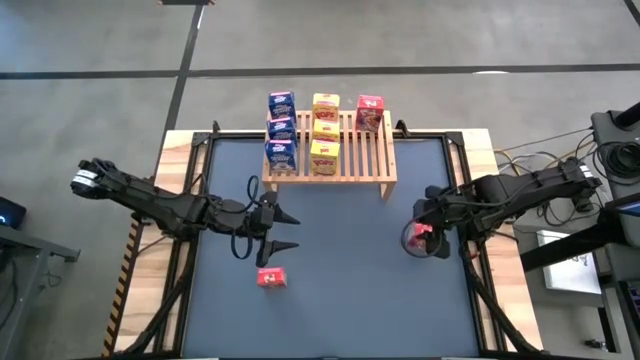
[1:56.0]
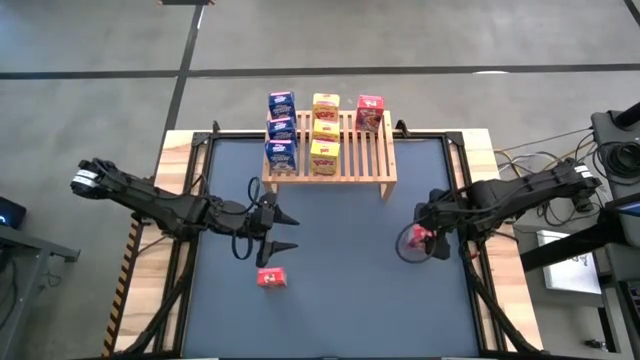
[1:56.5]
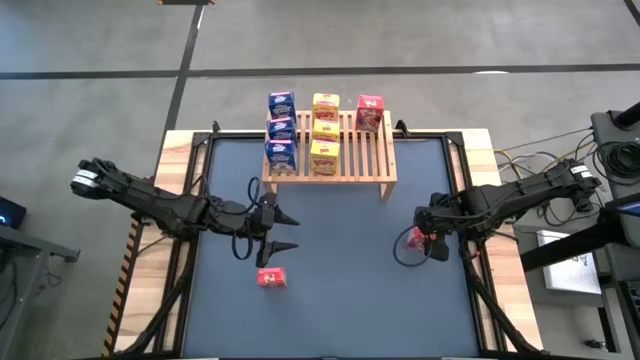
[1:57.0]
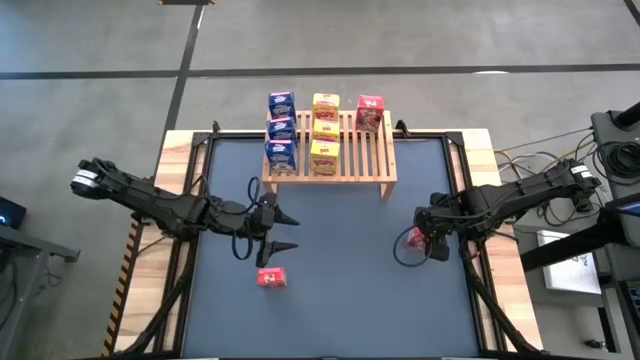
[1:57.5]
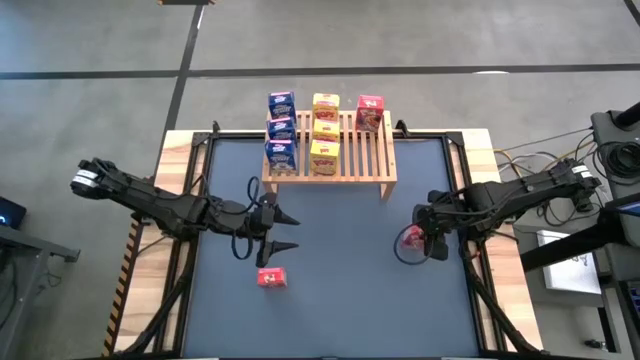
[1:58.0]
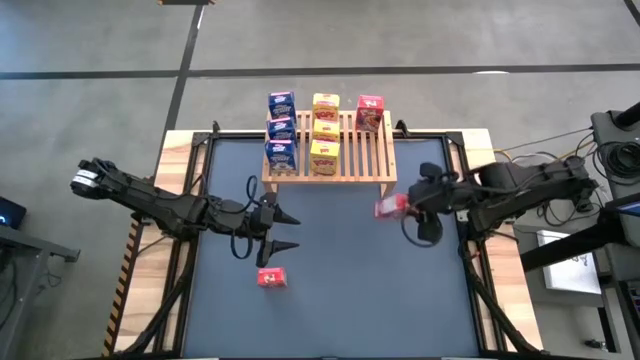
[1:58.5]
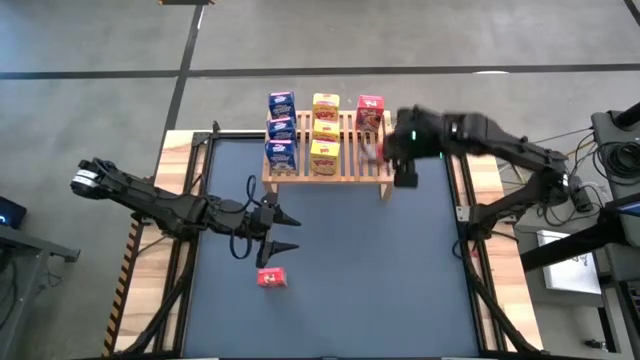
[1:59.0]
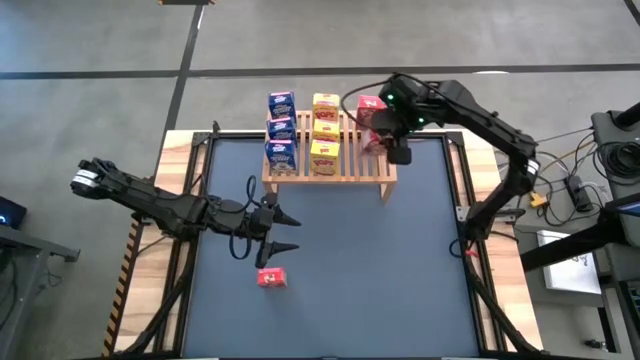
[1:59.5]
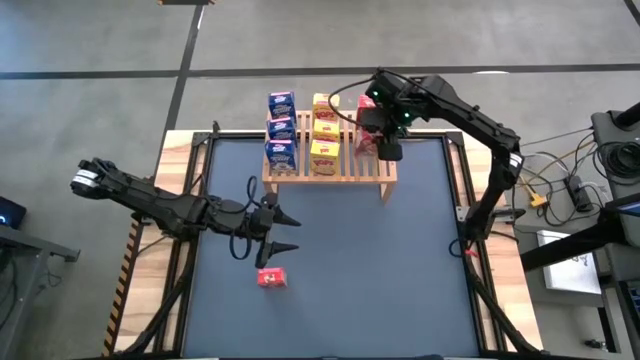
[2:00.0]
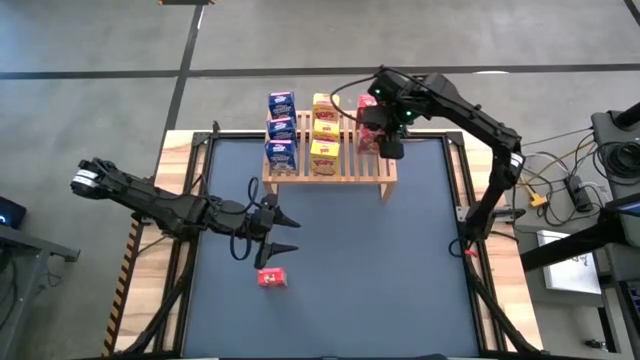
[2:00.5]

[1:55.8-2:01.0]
Task: Stack cereal on shelf
Put the top red cereal box on the shelf aligned with the other red cereal box

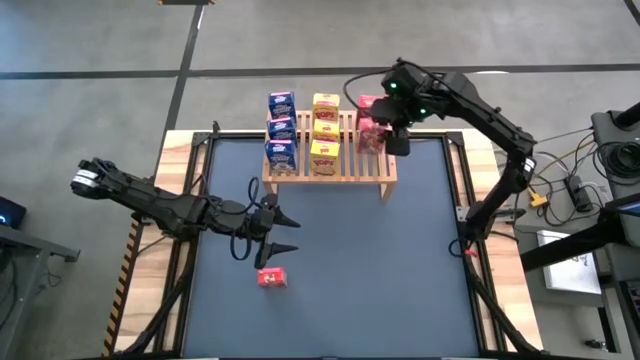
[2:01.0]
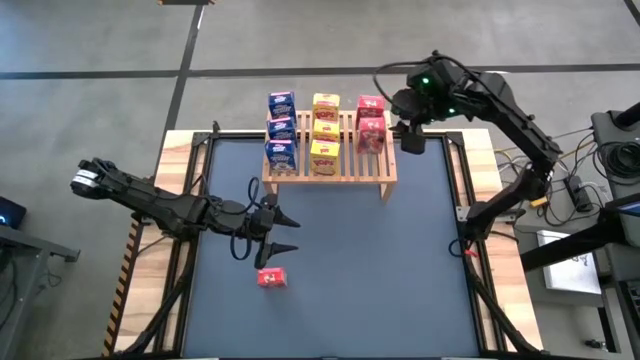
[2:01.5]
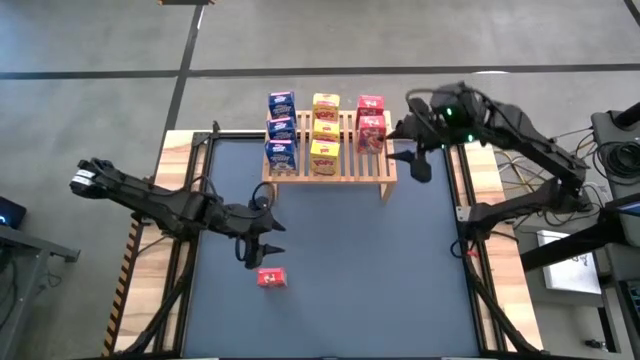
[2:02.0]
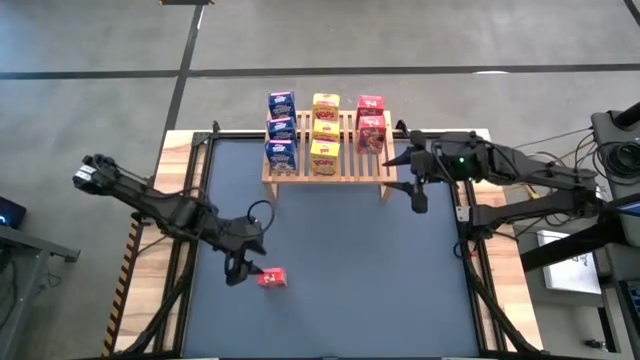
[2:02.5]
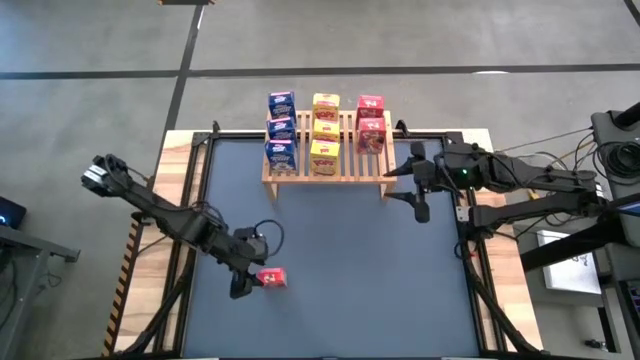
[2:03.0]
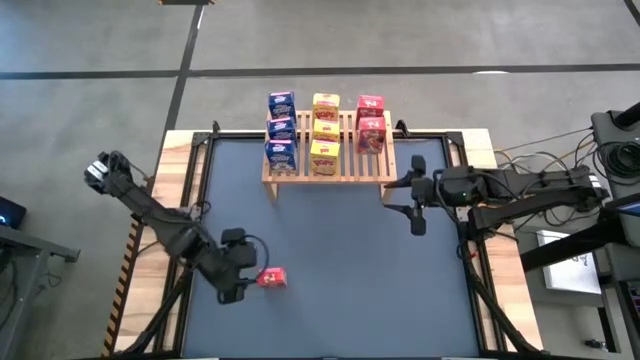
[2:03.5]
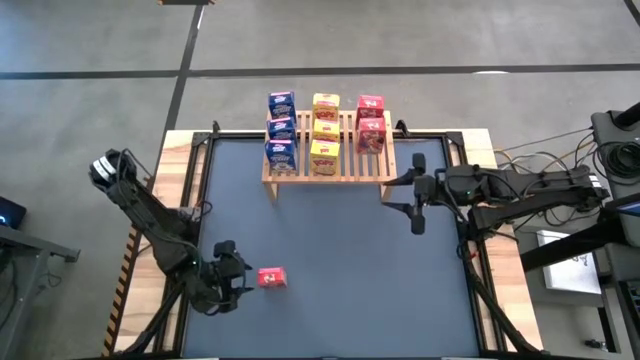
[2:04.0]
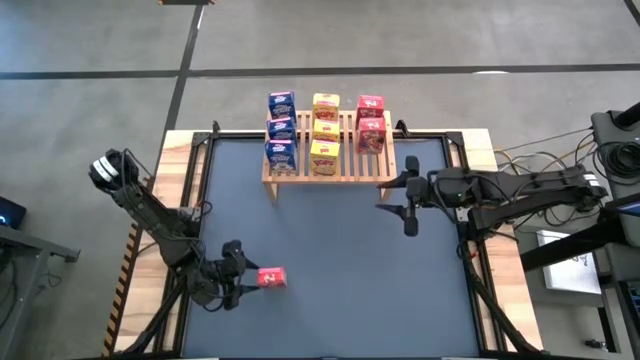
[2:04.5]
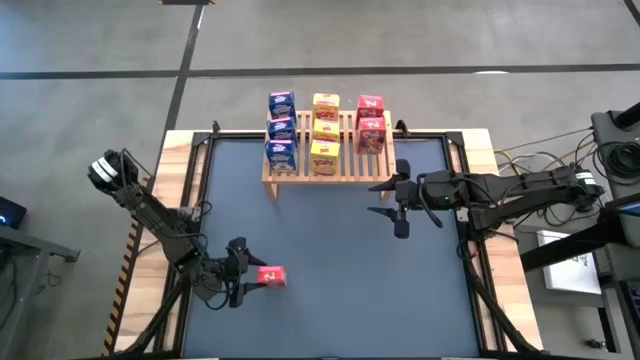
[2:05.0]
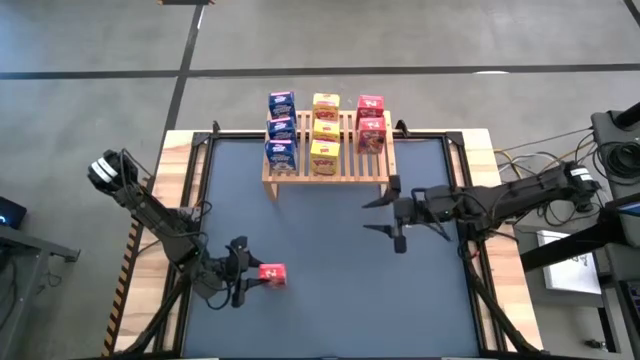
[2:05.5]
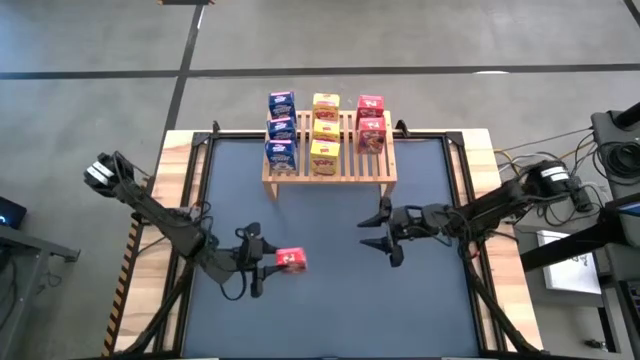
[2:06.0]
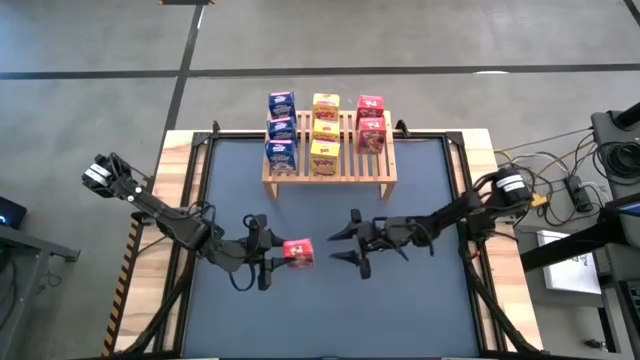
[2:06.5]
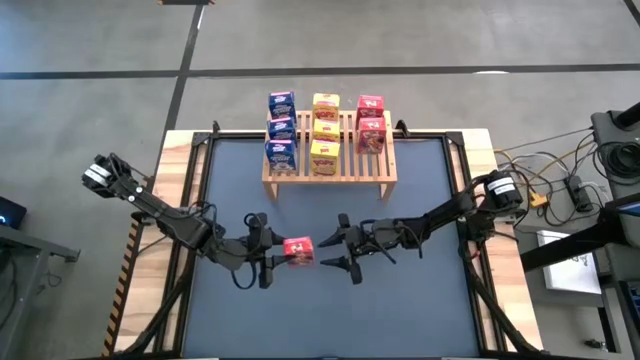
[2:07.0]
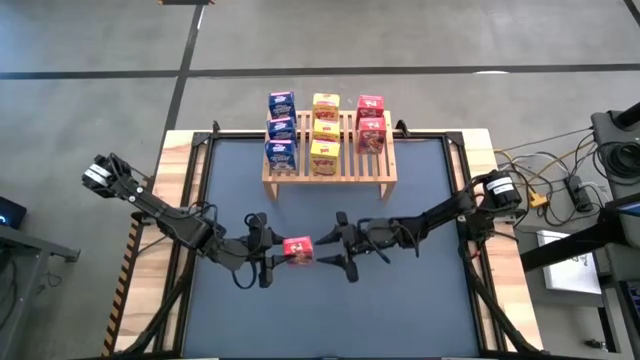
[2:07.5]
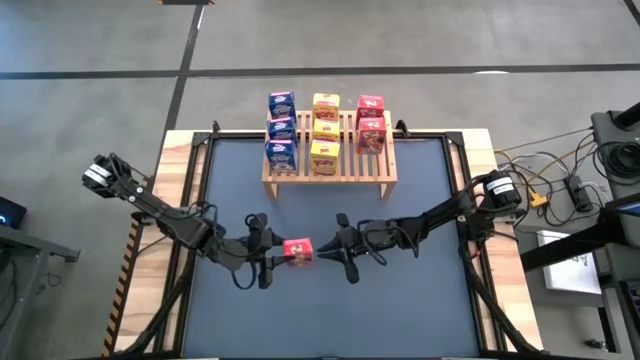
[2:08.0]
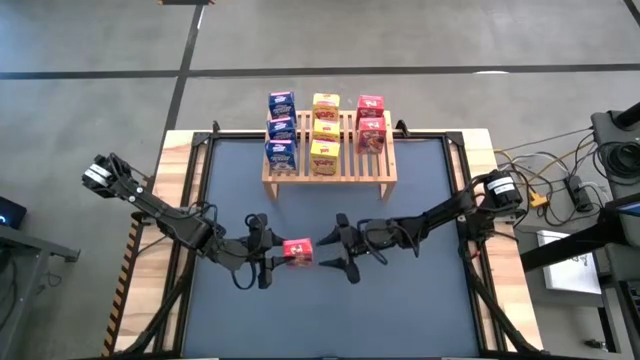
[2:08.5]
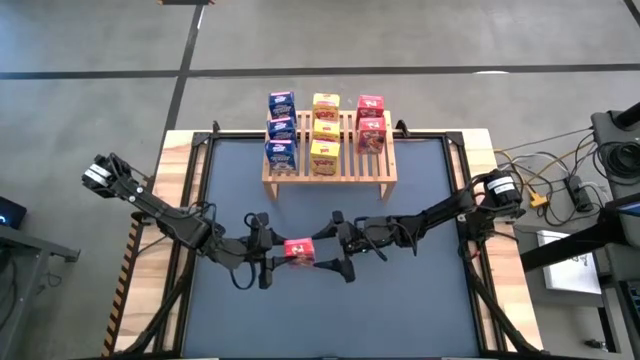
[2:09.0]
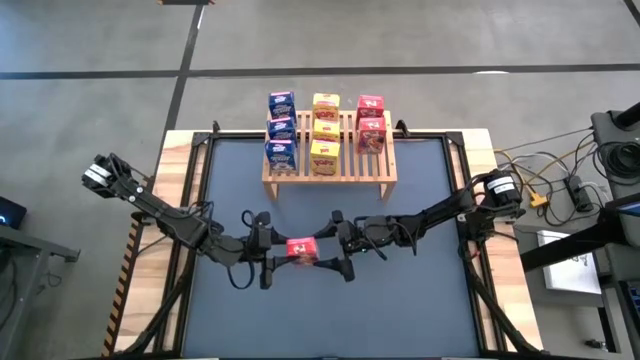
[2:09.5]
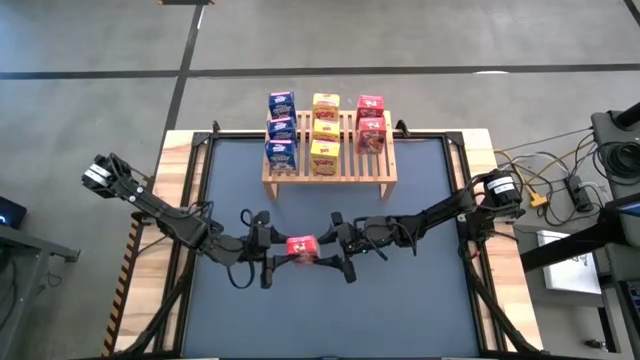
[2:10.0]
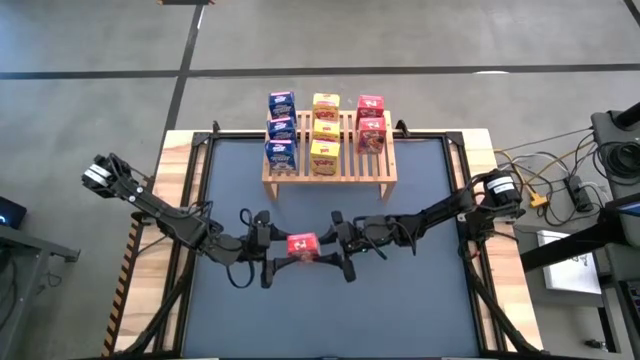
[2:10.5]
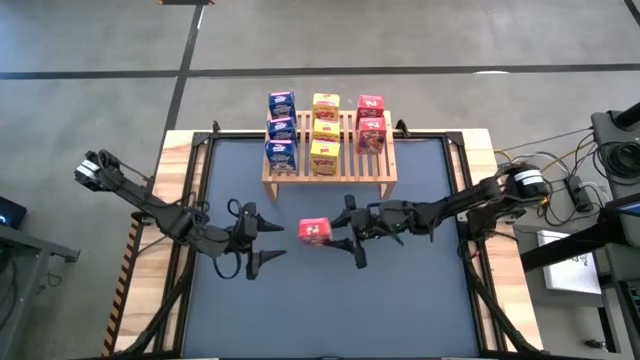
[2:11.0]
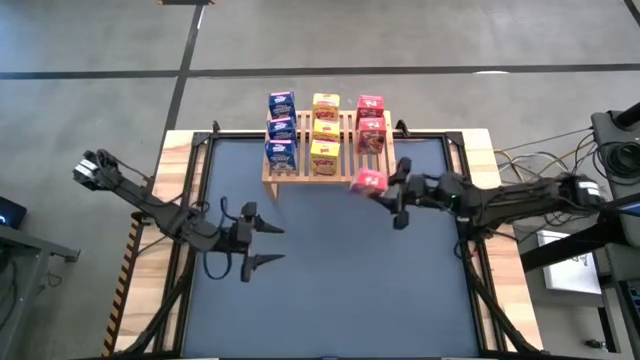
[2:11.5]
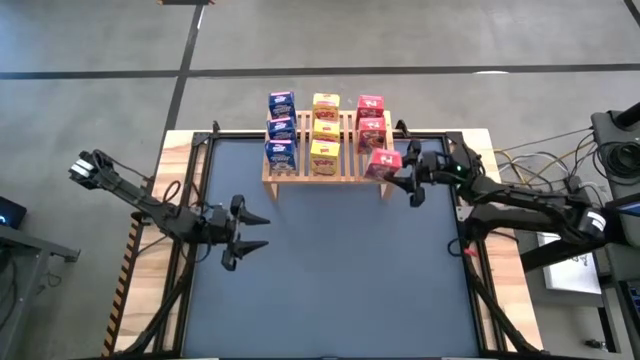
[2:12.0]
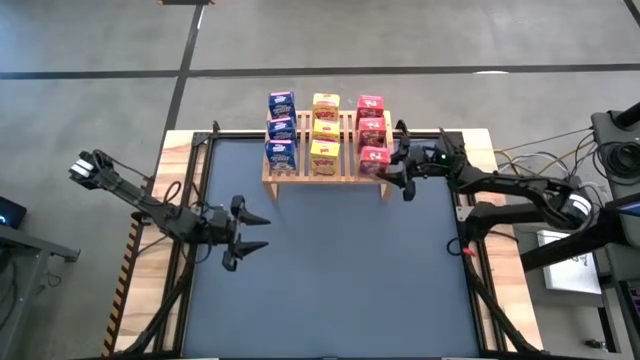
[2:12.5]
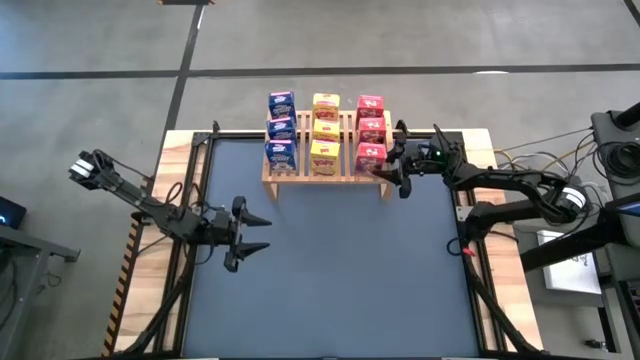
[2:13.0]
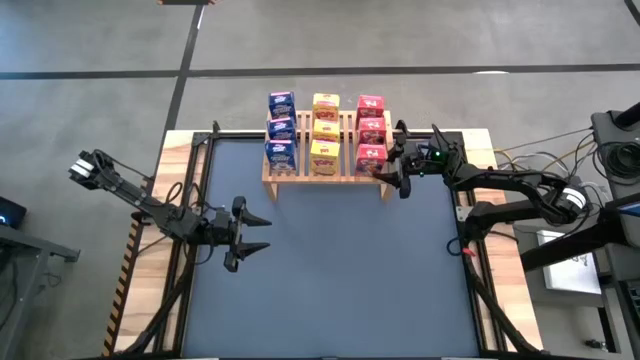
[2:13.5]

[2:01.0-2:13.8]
Put the red cereal box on the shelf aligned with the other red cereal boxes

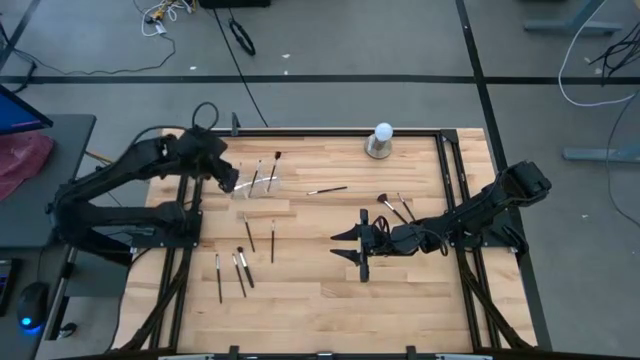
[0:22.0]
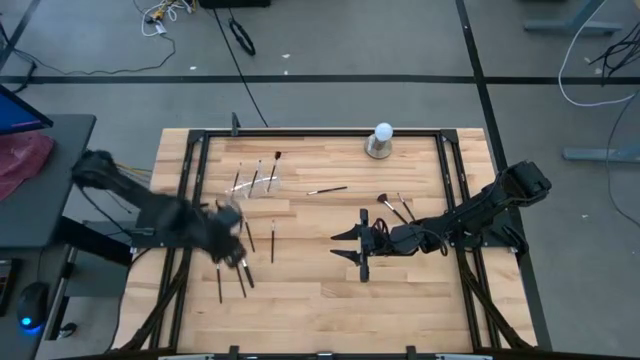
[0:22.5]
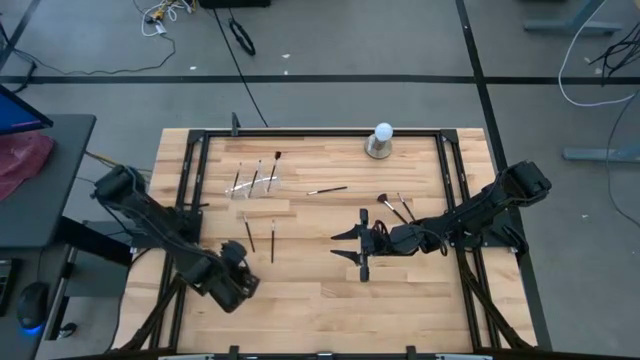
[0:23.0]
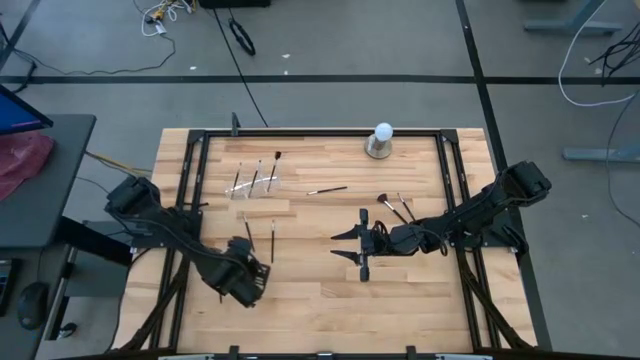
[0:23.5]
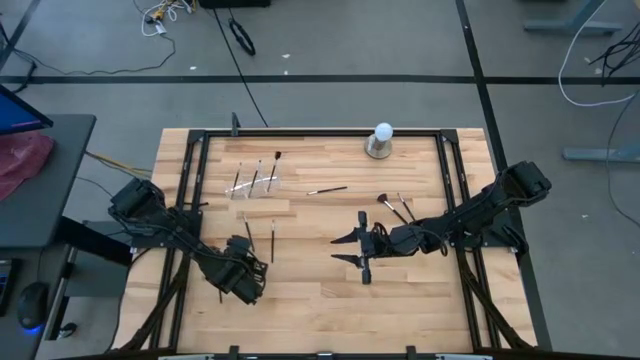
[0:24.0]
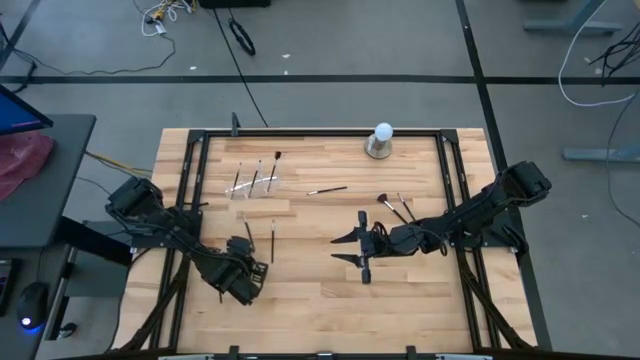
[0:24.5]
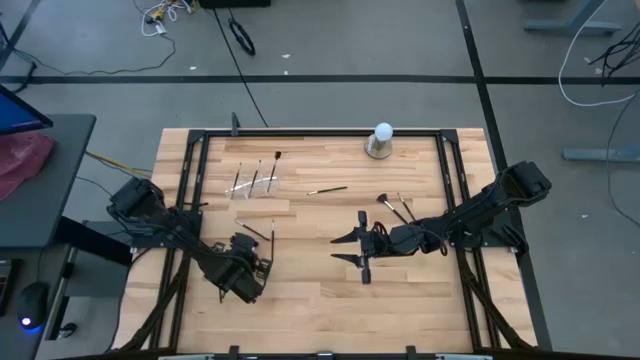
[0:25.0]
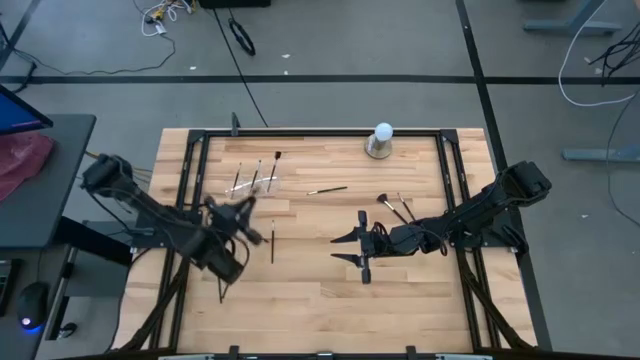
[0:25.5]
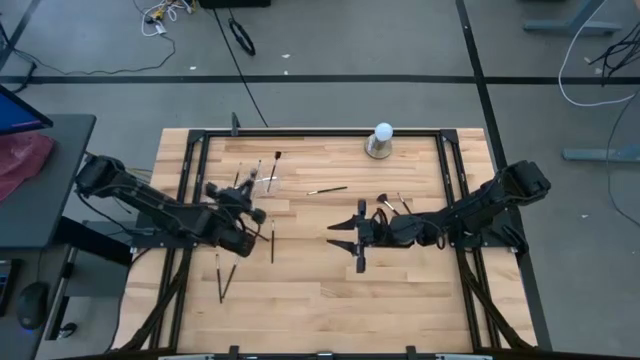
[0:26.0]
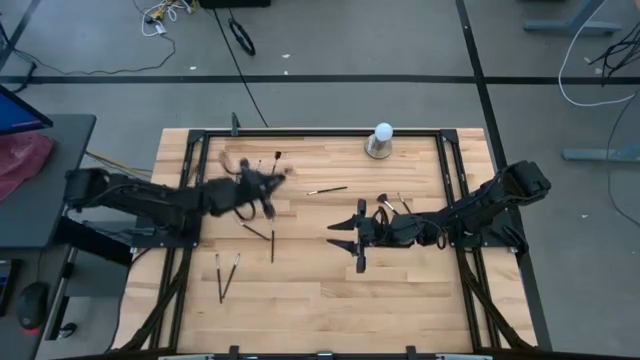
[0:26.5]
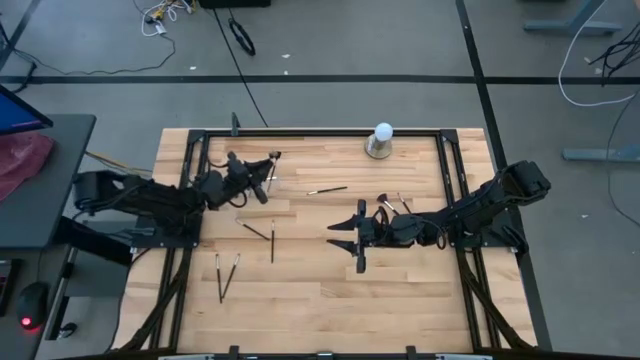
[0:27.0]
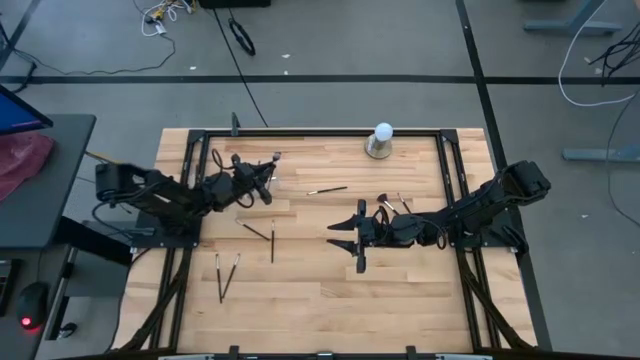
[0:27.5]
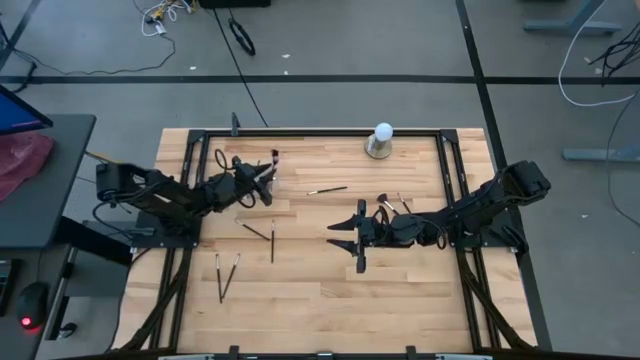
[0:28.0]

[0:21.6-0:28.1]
Task: Put items in baskets/containers
Put the black powder brush into the right section of the transparent organizer
